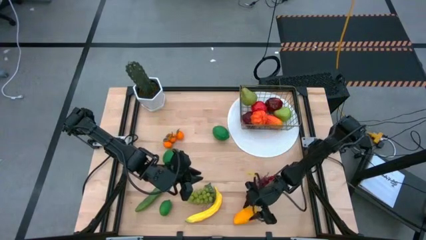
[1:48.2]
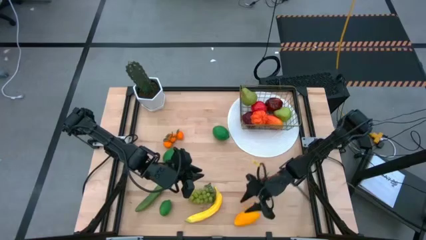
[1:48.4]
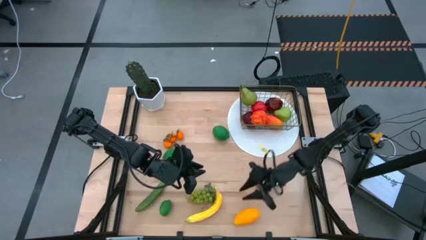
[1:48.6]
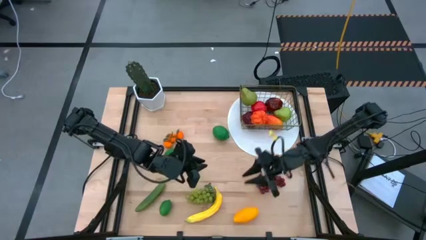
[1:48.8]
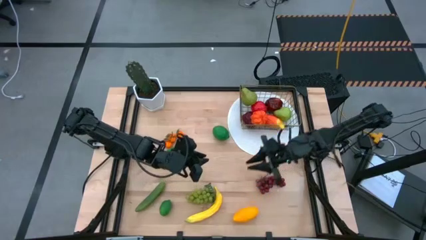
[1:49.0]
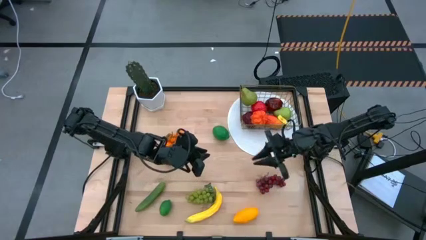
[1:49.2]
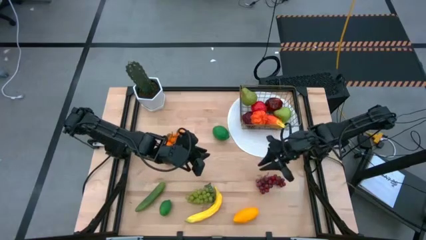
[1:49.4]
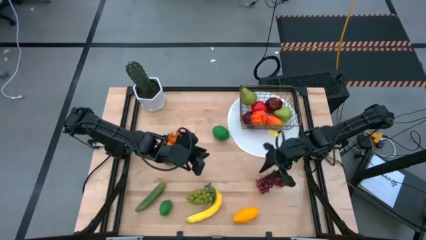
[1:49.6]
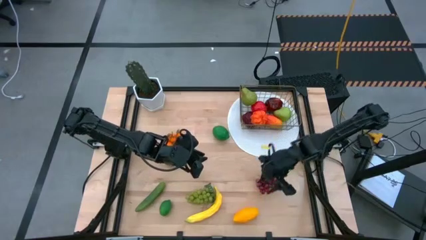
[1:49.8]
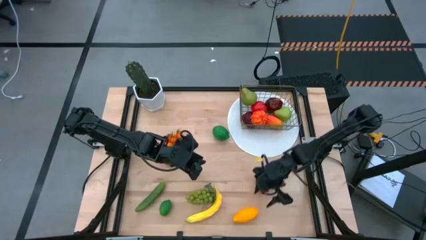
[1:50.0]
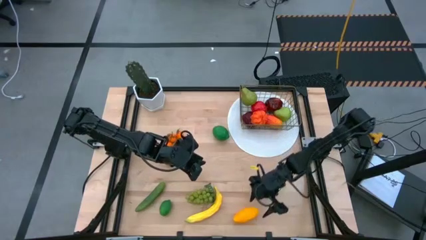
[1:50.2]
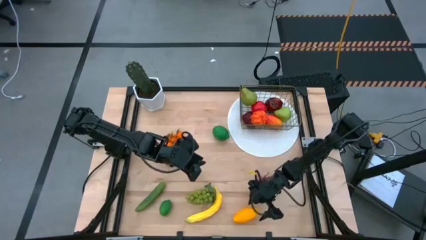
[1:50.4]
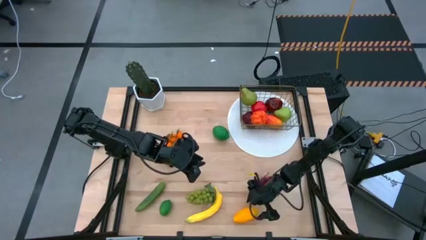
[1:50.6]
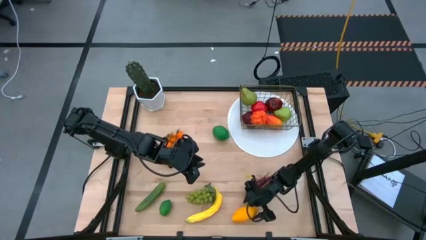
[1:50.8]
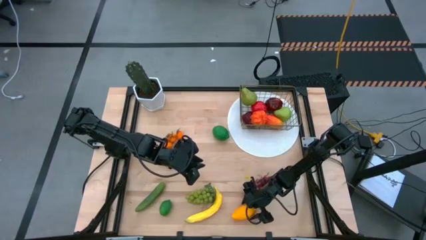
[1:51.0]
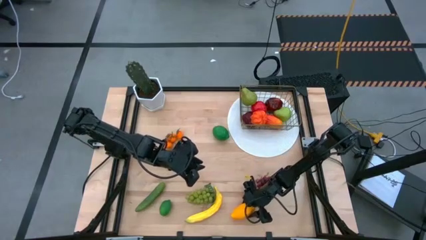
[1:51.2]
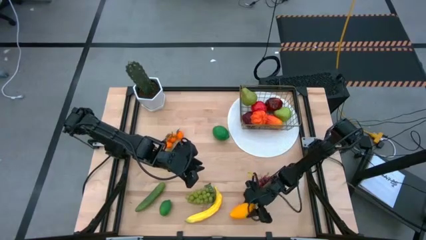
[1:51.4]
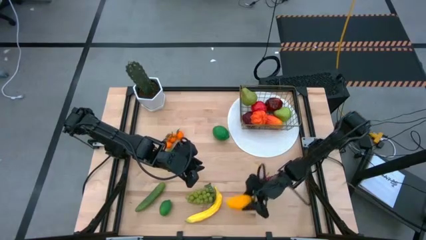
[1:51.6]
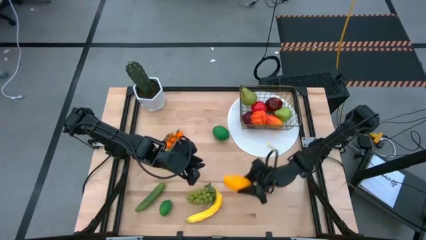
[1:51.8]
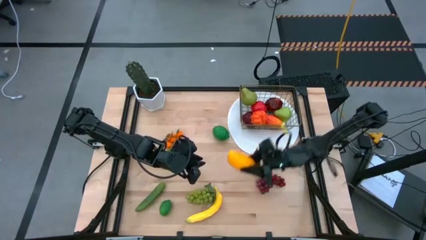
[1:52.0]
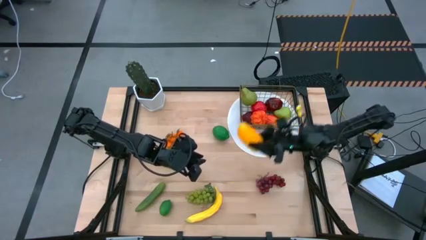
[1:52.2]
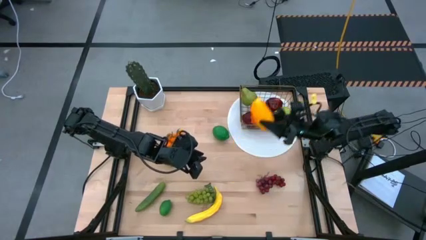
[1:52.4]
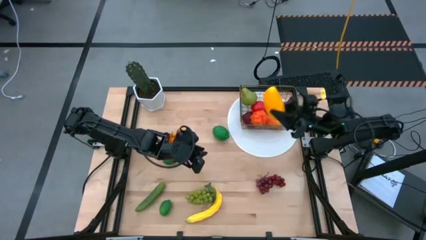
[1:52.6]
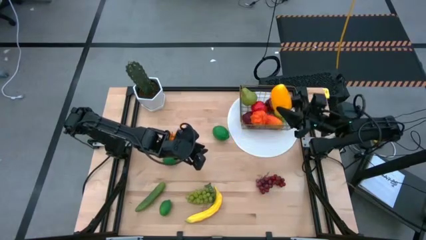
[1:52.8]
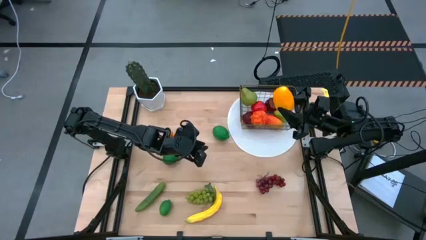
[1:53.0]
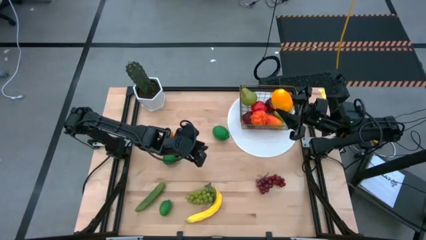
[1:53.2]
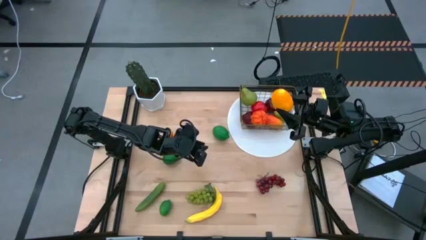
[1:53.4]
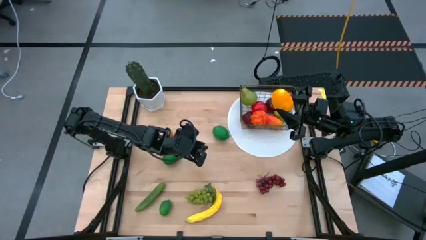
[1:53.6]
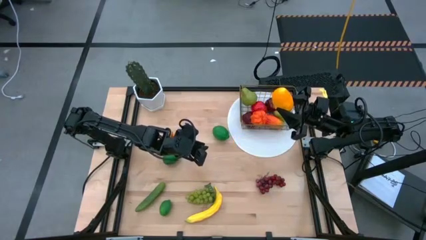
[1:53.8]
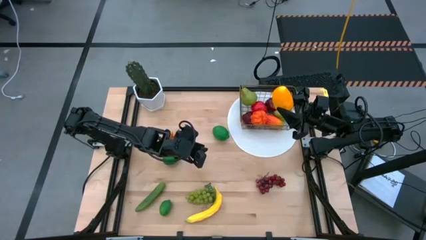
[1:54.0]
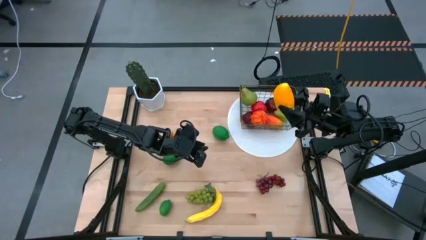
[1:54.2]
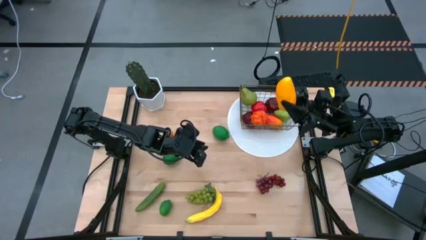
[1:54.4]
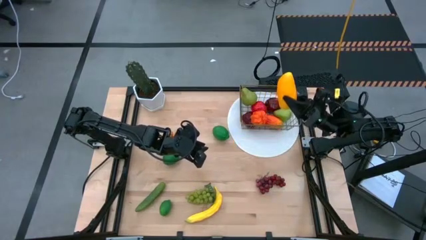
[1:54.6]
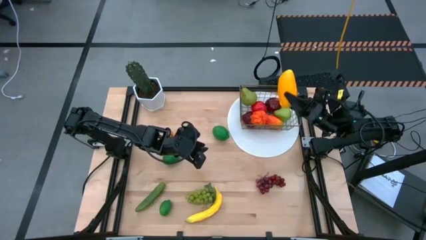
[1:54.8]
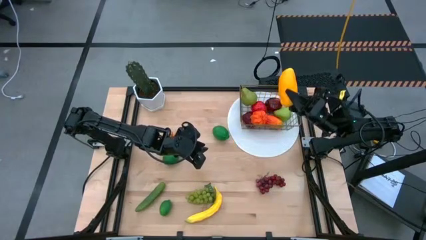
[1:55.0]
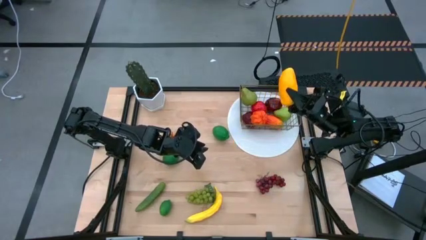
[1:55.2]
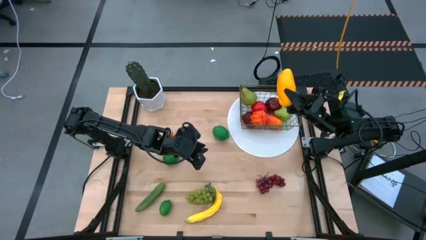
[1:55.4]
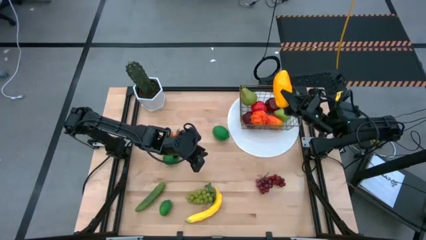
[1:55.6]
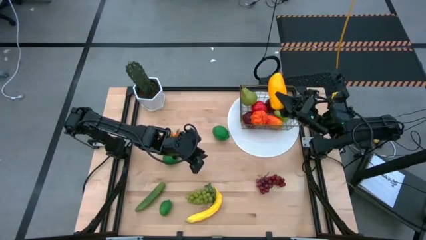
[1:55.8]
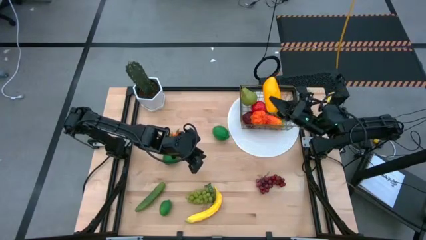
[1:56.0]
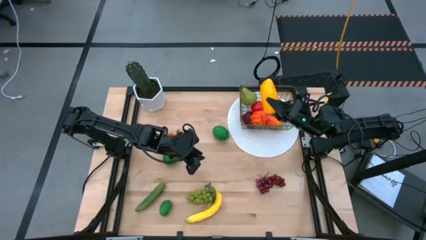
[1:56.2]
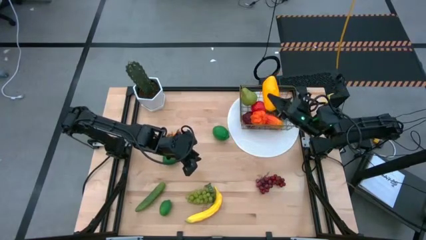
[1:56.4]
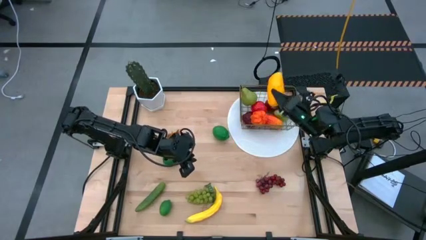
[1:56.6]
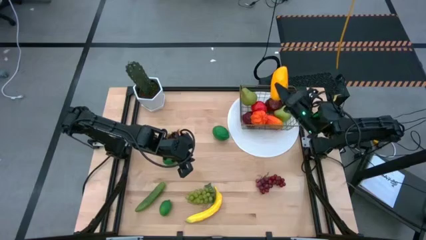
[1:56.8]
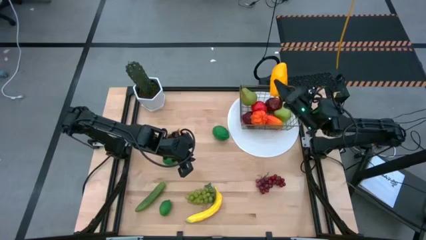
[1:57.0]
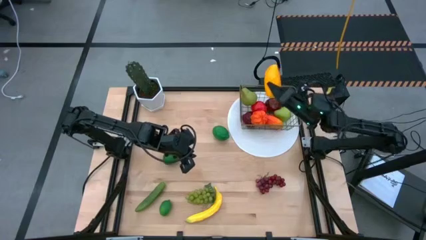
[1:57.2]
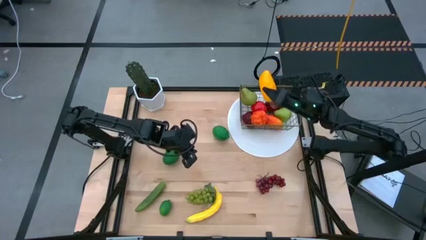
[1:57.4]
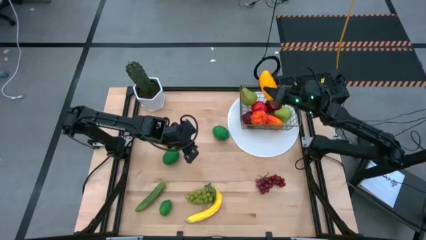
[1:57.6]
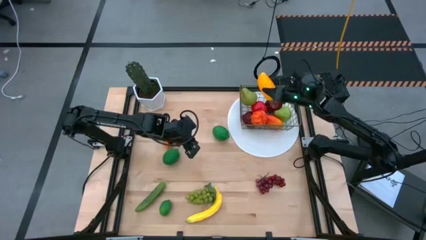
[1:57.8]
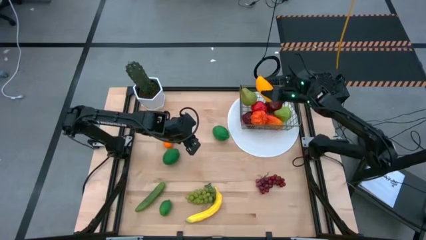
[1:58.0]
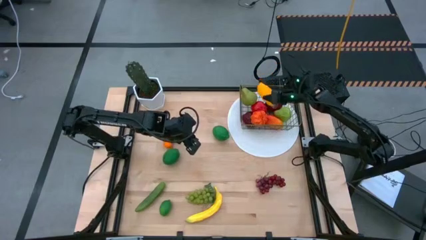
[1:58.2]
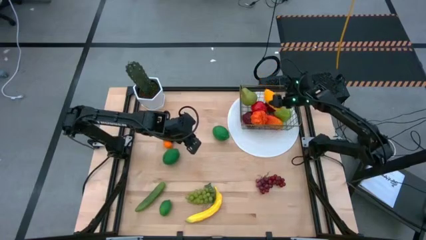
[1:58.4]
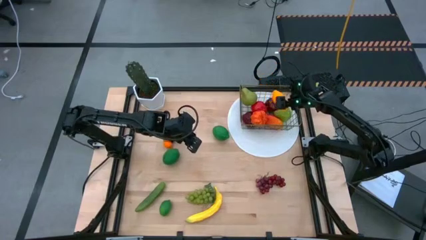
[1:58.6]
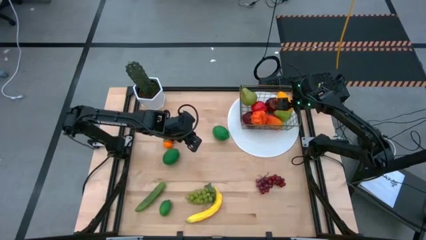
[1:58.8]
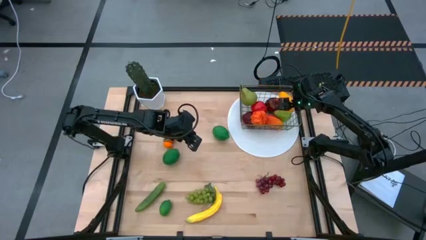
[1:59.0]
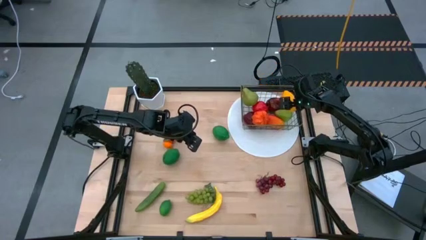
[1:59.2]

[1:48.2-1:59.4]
Task: Build produce basket
Put the yellow mango into the gold wire basket
